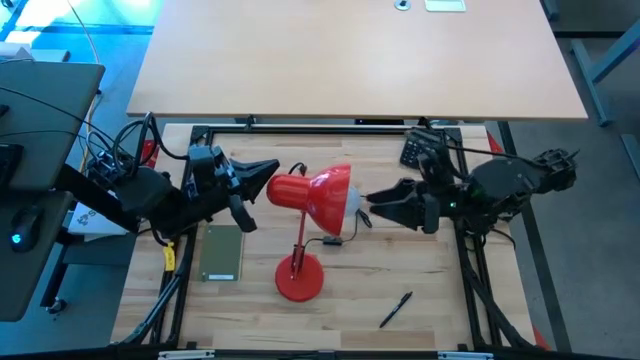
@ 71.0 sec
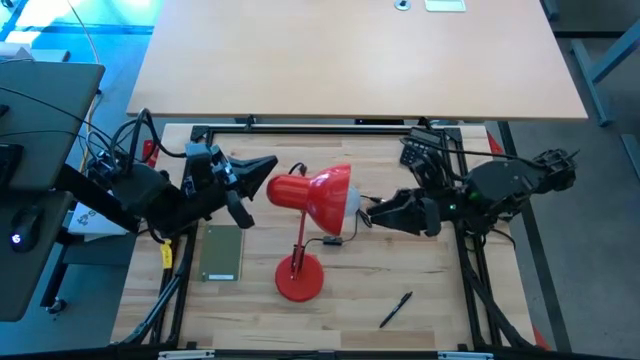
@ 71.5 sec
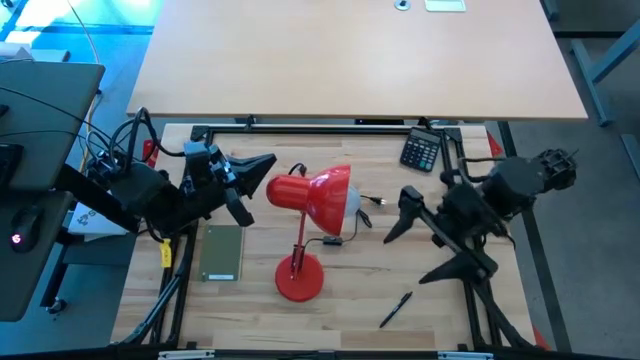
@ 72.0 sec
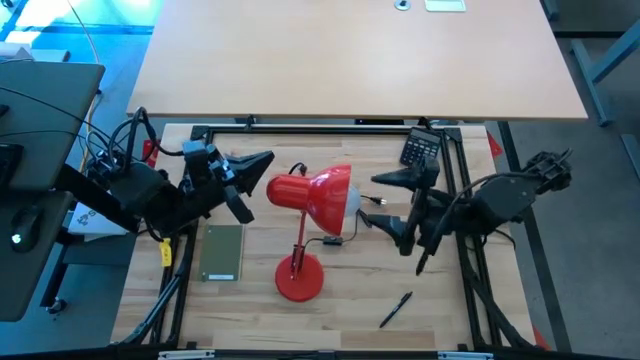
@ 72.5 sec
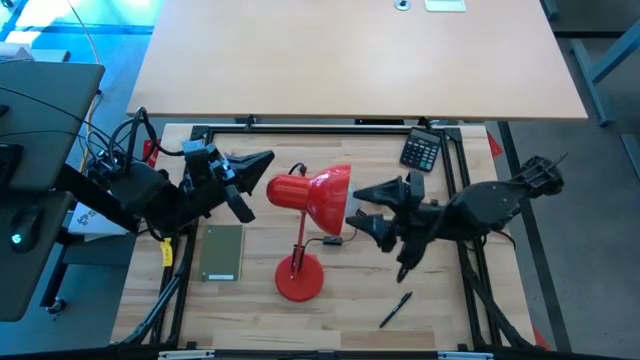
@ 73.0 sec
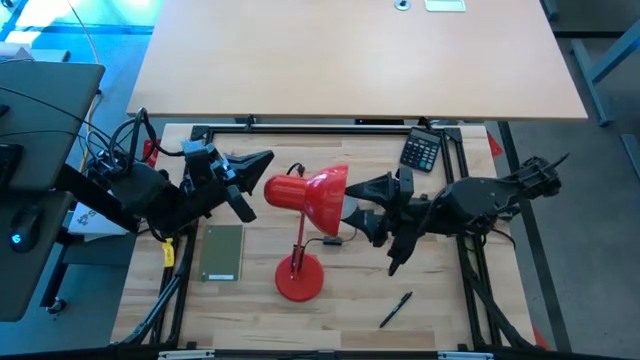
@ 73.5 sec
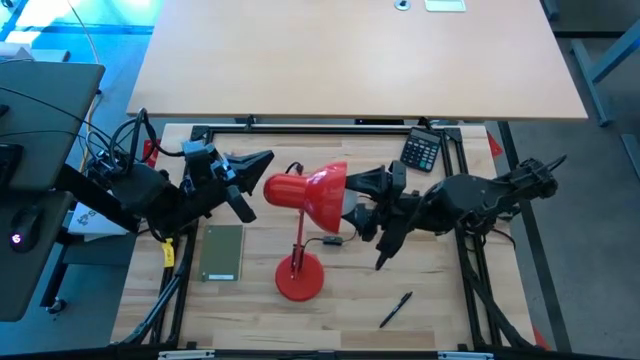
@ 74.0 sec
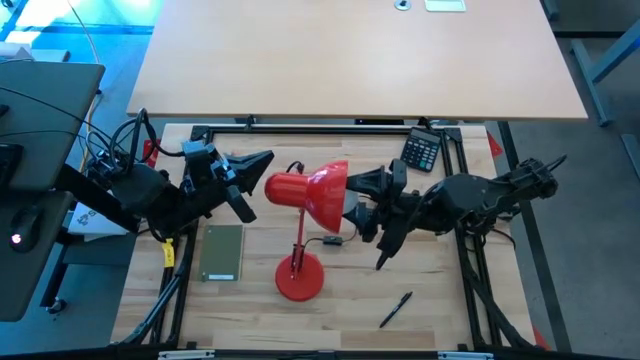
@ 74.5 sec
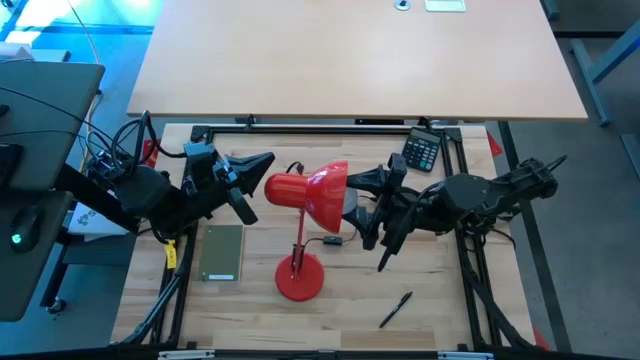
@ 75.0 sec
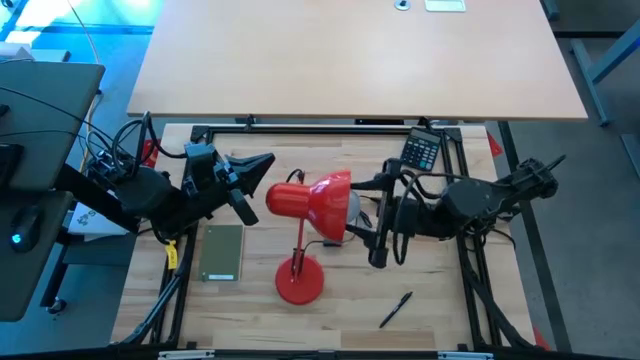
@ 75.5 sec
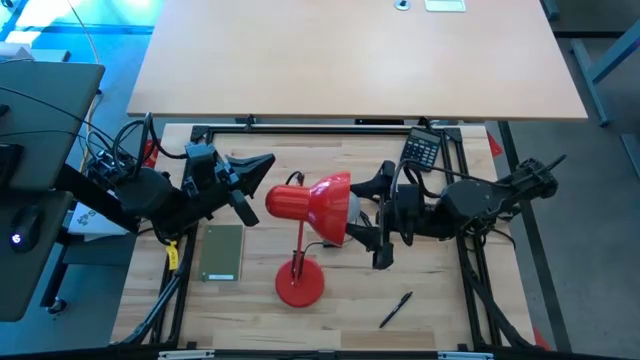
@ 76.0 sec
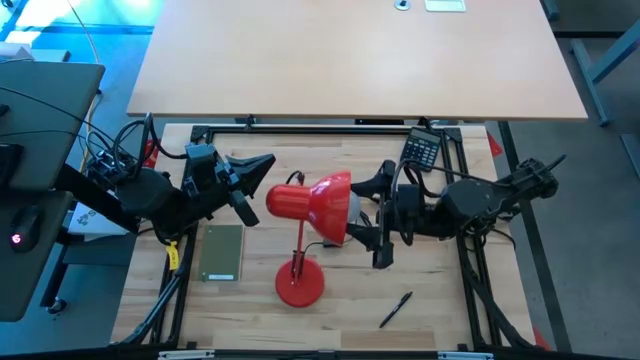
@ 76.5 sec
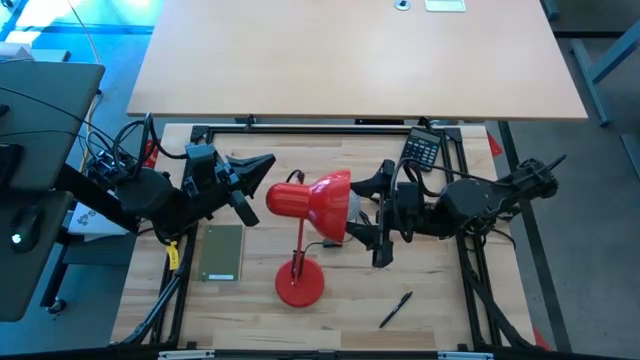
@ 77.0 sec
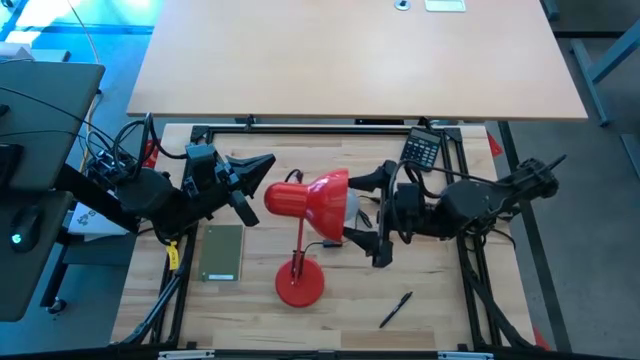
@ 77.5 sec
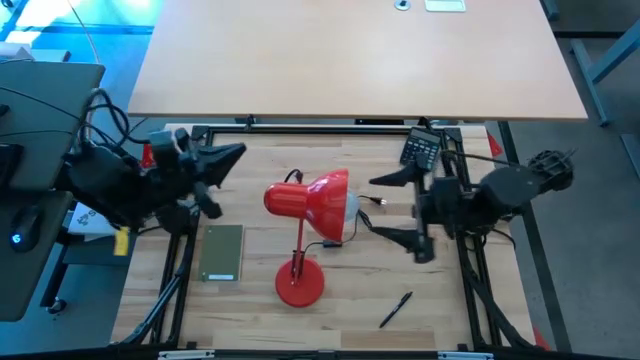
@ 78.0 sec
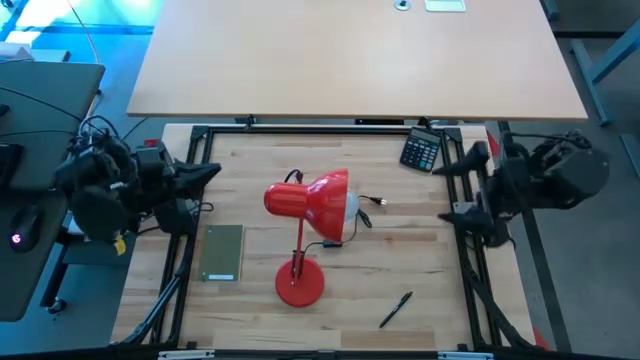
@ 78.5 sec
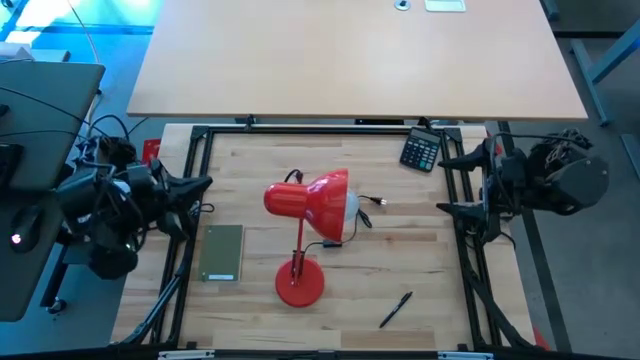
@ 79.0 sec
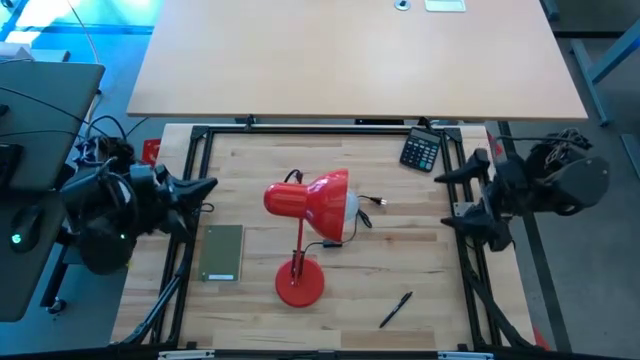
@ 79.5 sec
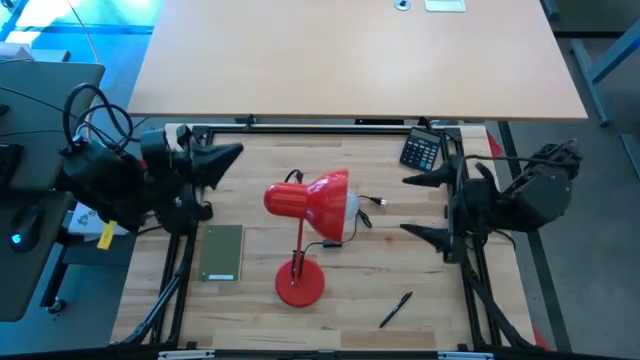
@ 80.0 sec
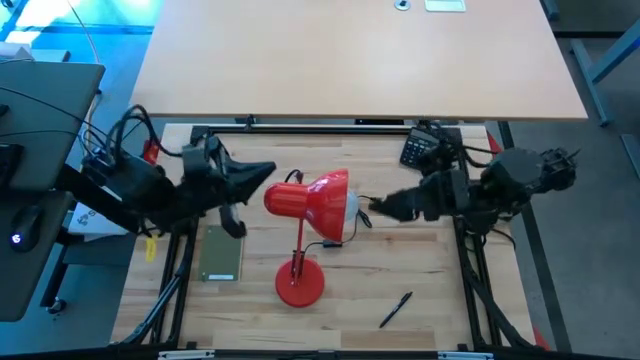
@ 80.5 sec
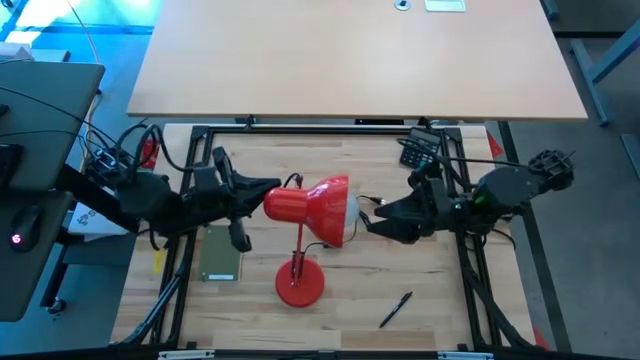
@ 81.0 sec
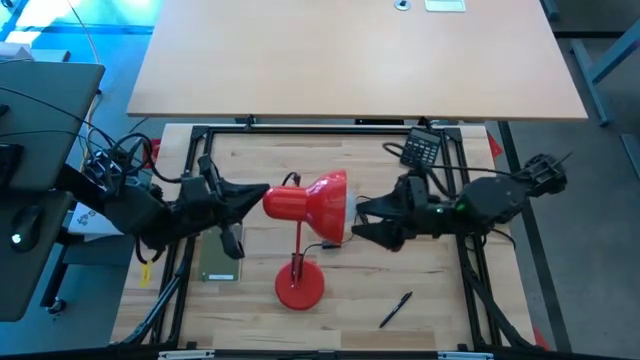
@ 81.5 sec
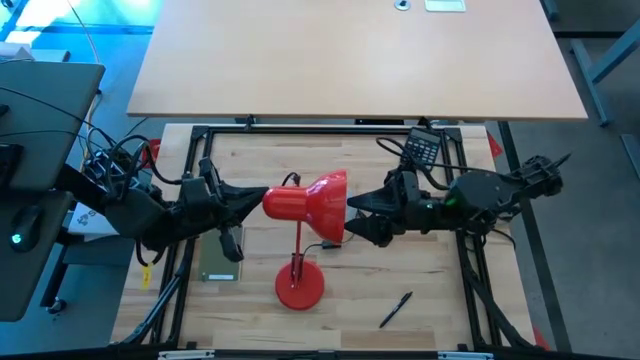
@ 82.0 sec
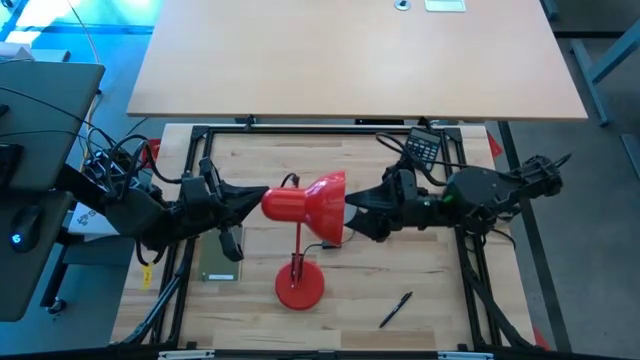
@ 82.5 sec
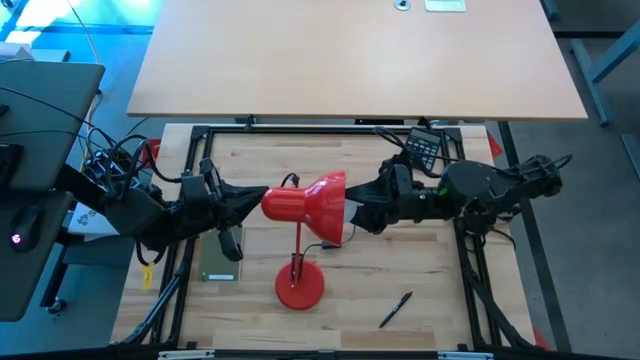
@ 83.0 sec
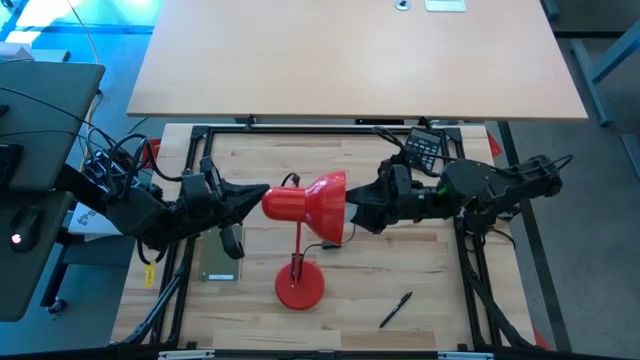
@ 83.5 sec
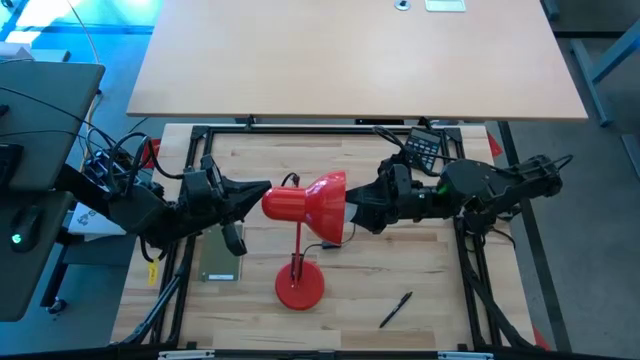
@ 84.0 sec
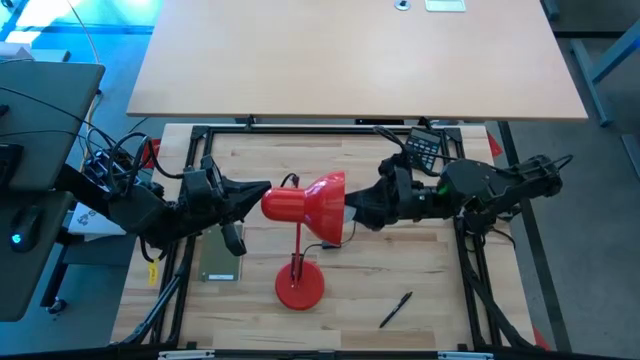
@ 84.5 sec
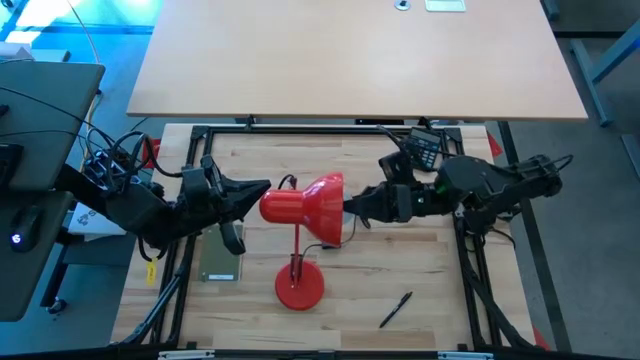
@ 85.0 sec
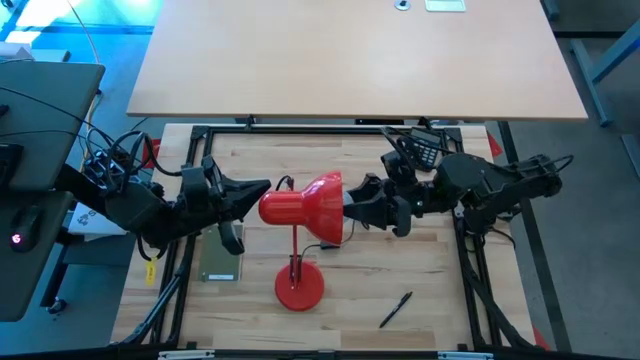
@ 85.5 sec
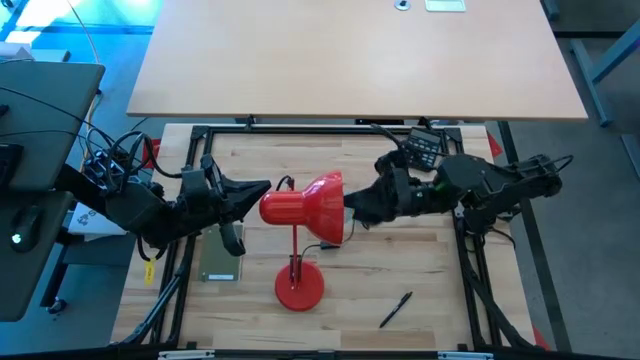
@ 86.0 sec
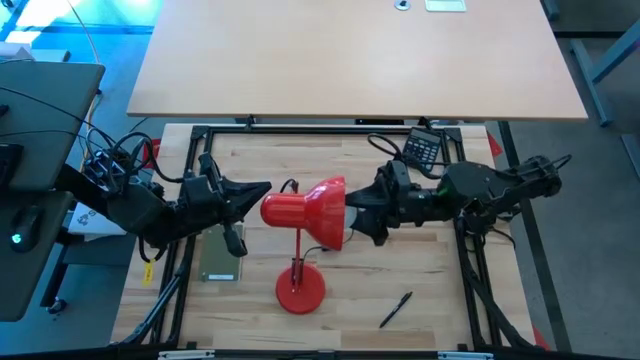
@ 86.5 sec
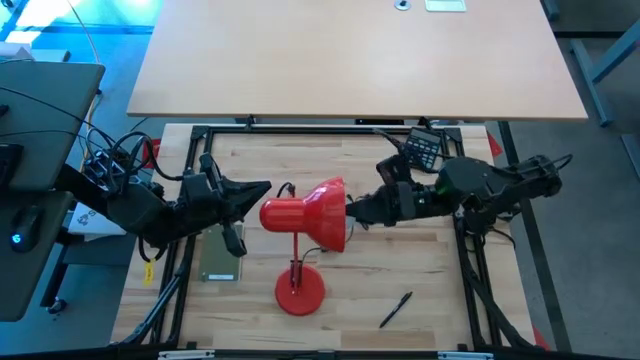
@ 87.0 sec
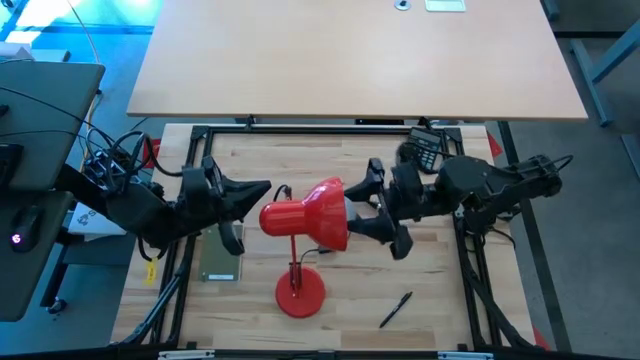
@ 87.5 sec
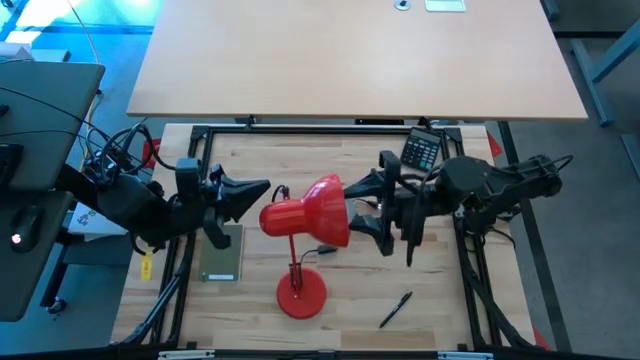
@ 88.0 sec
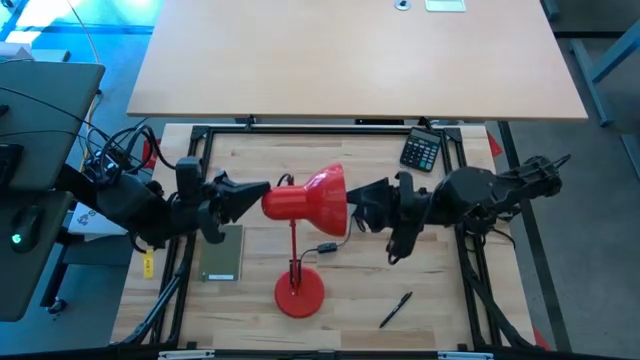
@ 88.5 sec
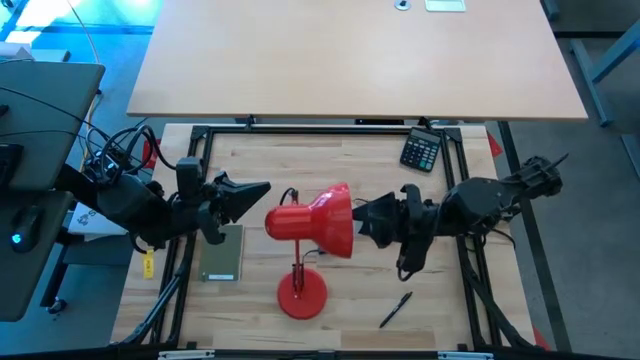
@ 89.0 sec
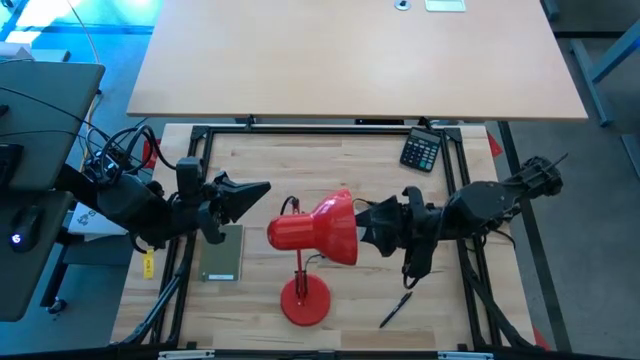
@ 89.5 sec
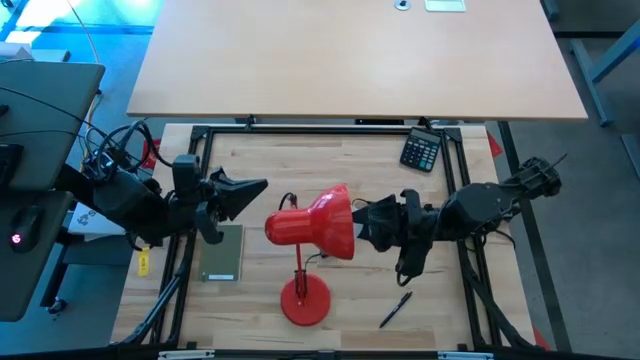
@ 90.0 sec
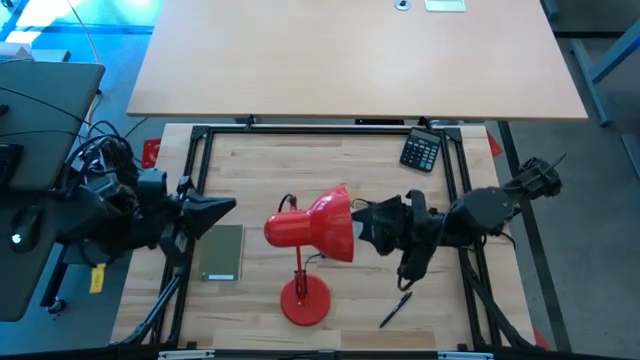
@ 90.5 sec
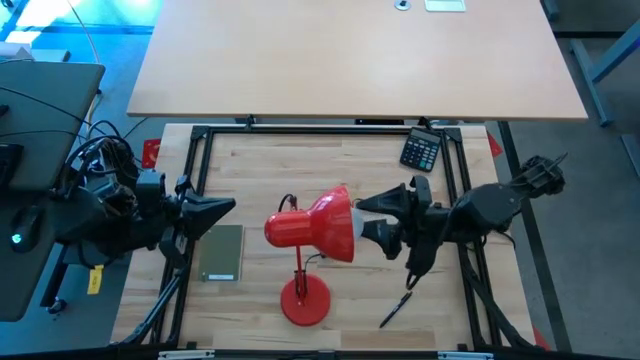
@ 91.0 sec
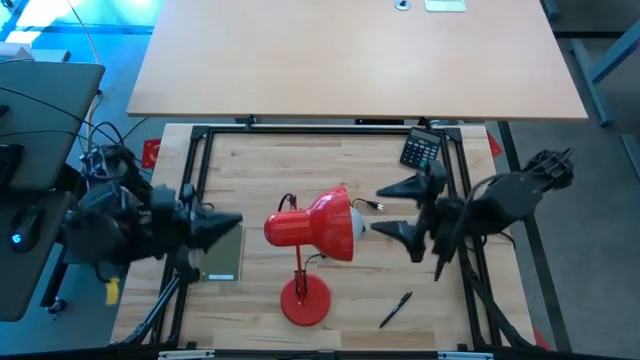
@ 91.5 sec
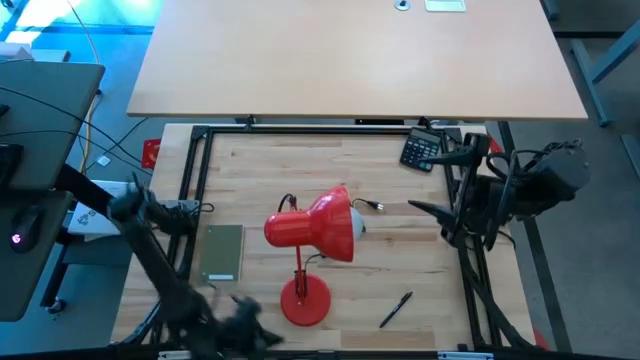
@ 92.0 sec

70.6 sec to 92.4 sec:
Task: Screw lightbulb
Insert the white lightbulb into the red lamp
